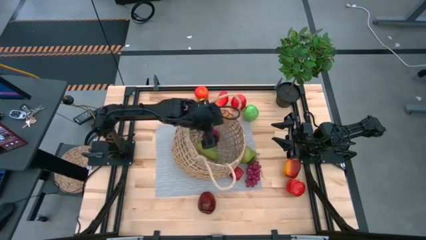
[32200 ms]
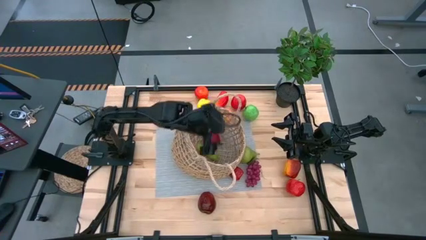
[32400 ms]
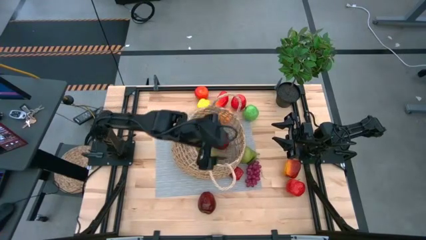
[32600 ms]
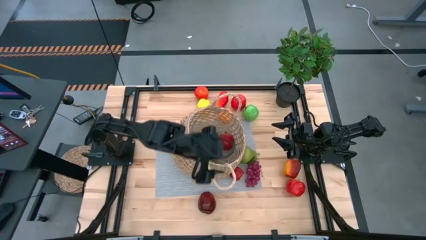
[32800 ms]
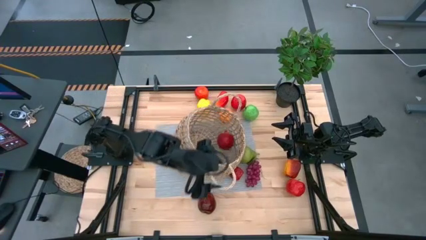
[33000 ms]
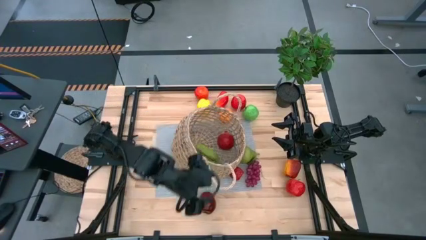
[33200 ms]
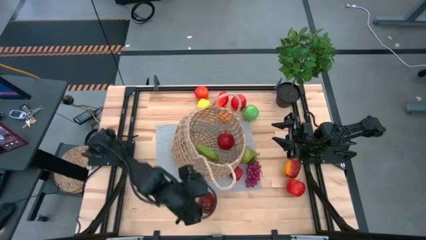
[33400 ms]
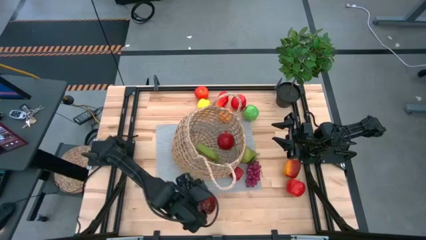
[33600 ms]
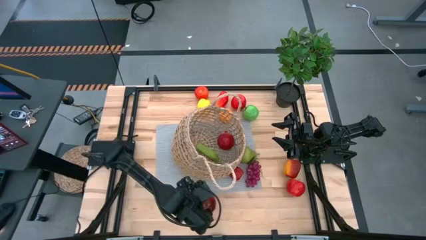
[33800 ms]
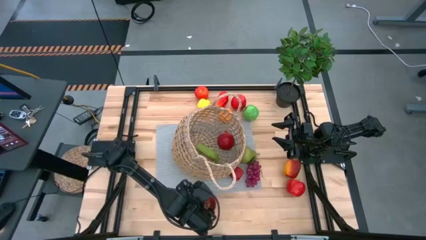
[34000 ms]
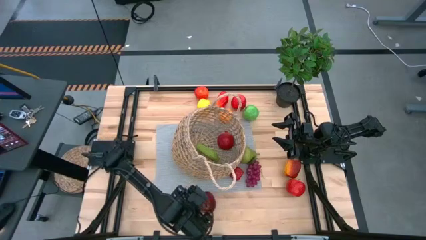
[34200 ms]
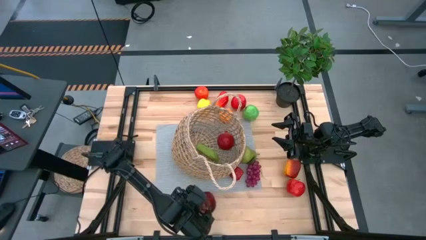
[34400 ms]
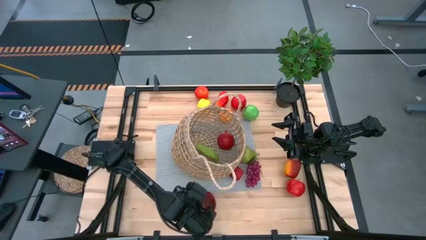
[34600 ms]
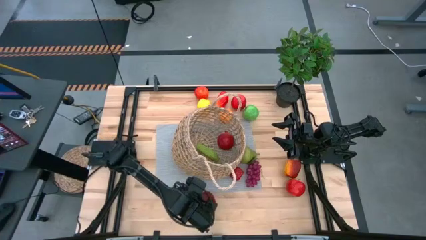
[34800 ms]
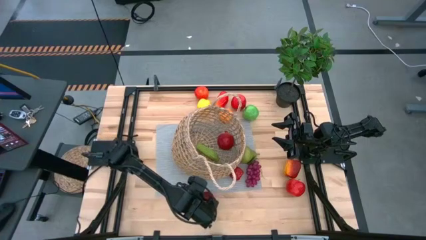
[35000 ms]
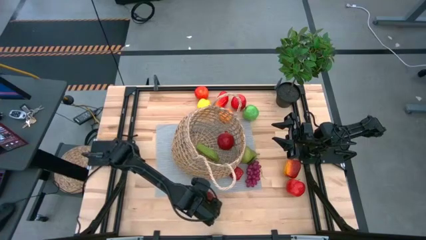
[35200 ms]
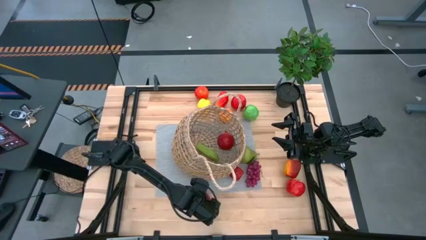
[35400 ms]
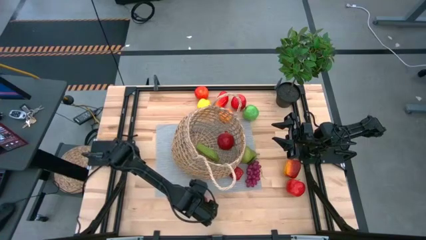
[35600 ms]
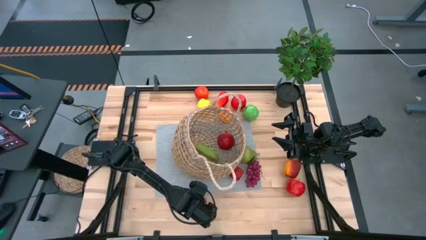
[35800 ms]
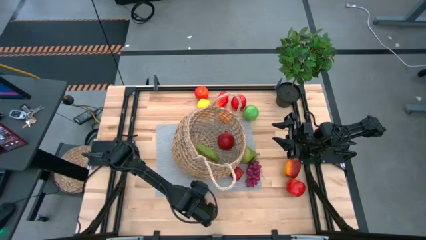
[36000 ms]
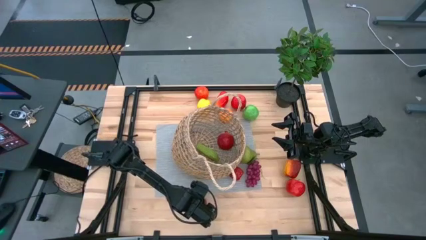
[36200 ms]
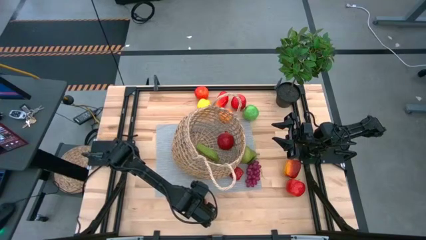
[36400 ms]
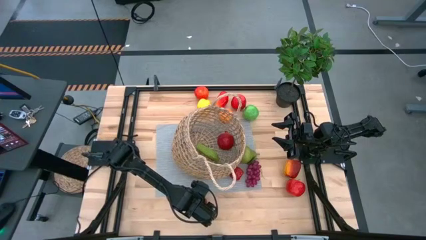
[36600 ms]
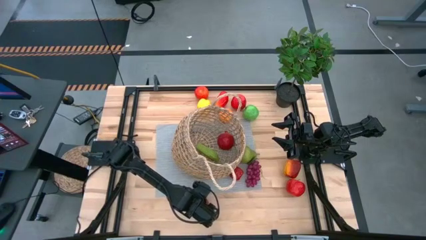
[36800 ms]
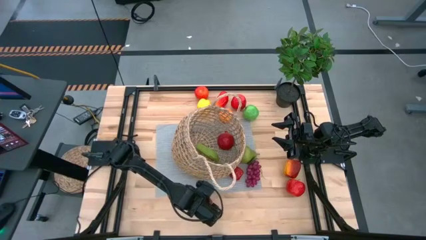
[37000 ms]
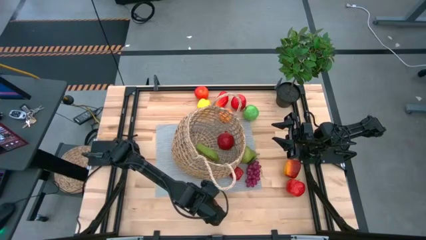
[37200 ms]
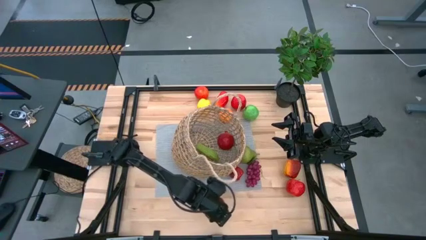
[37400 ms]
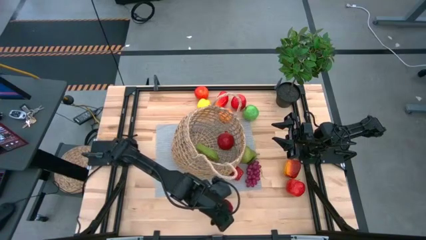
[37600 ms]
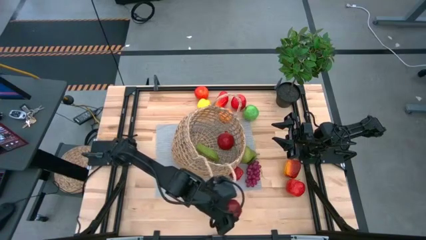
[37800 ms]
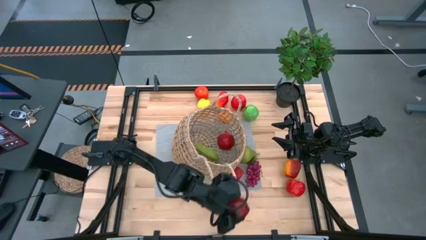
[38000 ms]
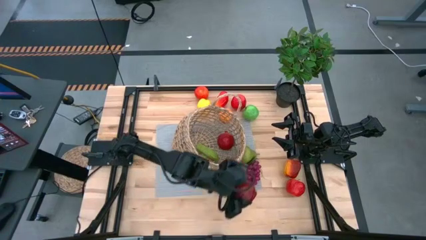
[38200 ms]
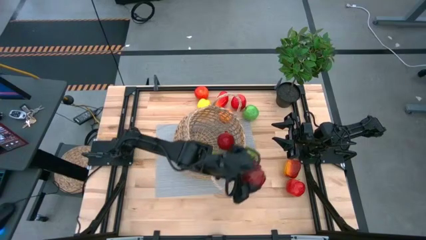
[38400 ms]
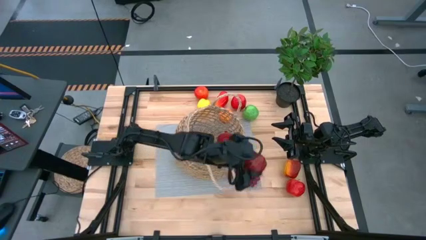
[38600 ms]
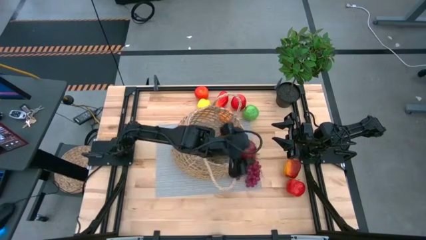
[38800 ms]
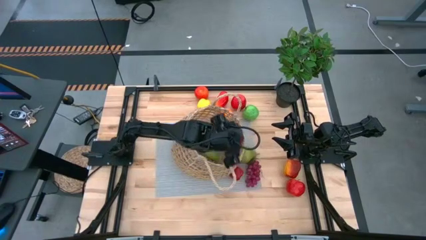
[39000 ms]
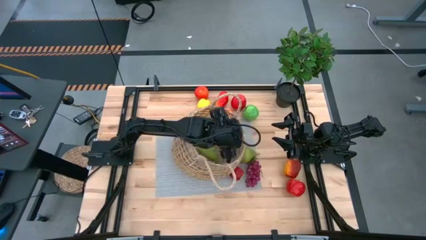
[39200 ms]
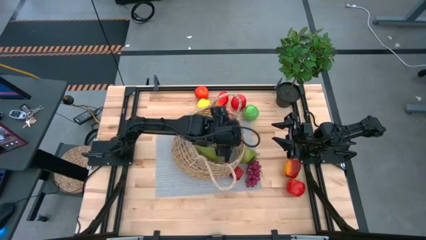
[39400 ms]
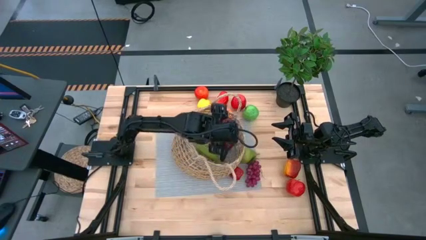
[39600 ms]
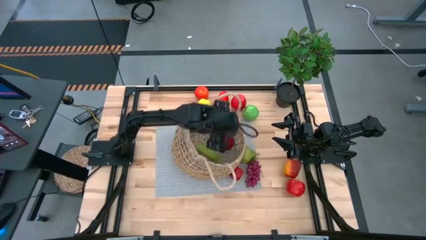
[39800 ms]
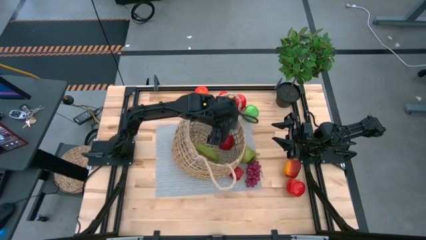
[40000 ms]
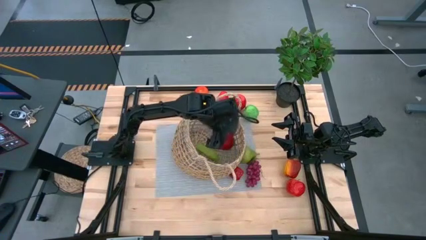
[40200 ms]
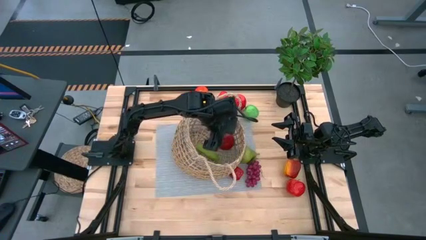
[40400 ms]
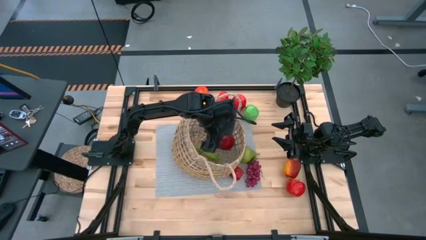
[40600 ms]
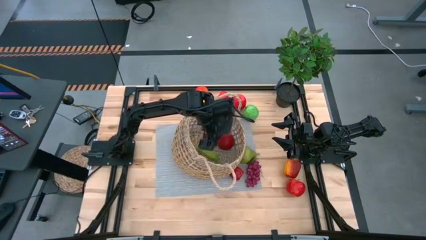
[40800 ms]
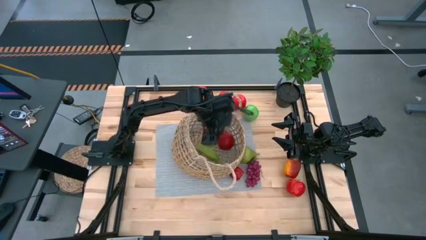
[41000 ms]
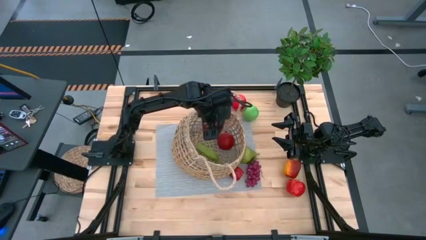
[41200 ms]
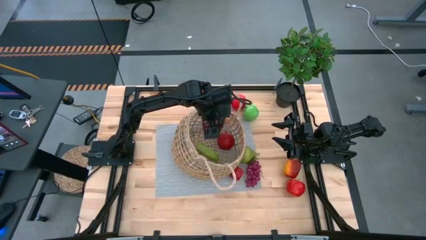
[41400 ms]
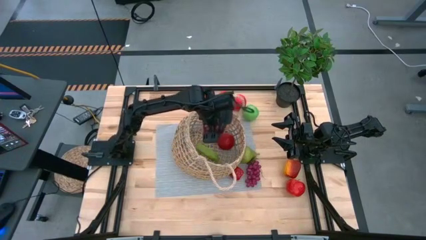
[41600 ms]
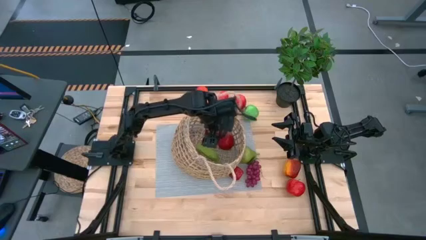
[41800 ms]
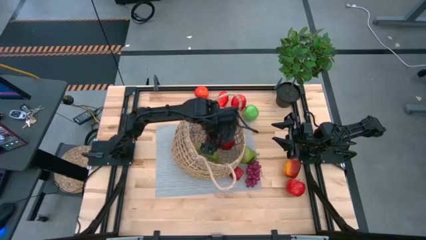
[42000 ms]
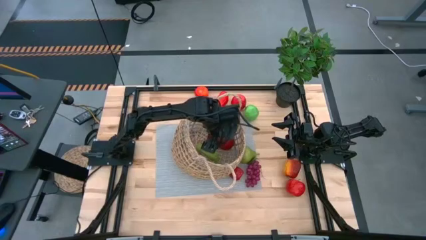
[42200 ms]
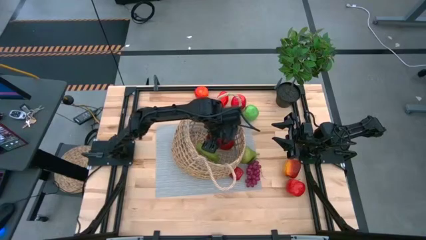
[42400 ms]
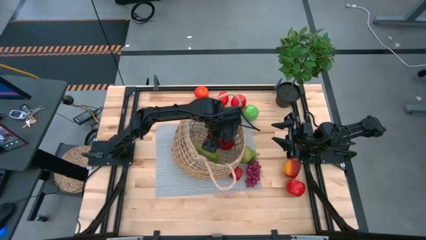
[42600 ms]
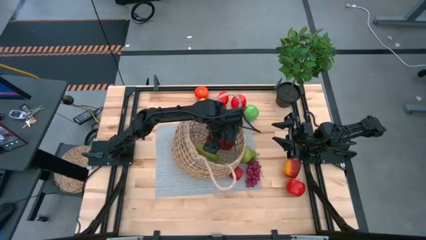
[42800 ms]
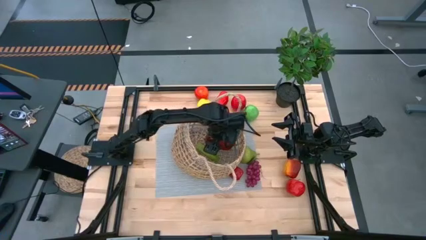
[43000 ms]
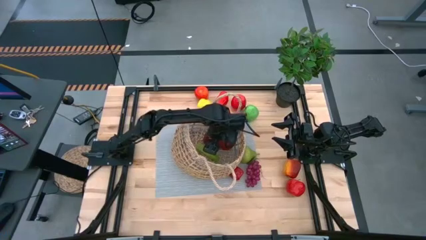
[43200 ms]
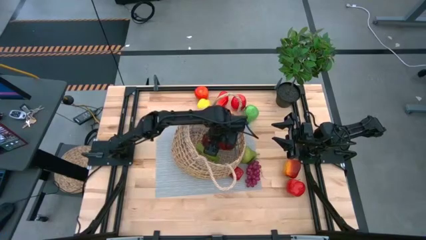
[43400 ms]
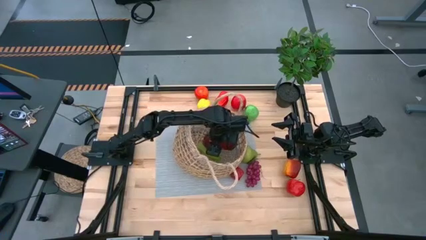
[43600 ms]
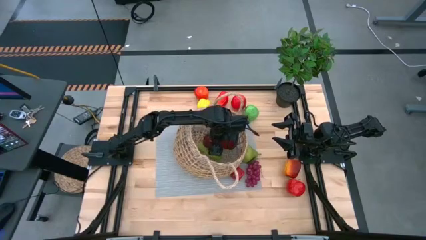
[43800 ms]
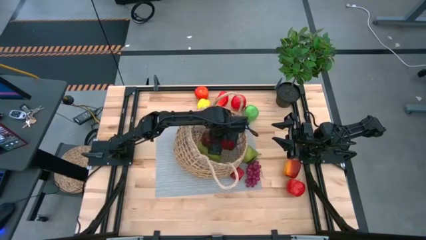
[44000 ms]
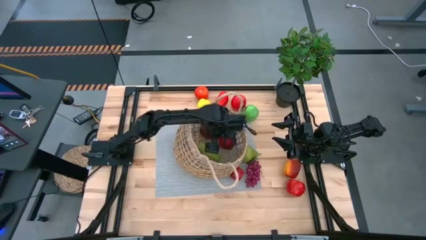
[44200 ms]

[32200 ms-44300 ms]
Task: Build produce basket
Put the bottom left red apple into the mesh basket

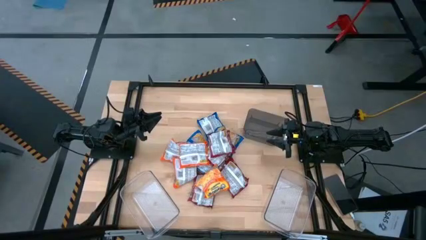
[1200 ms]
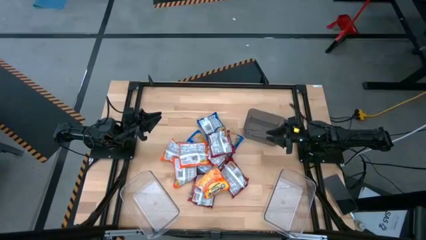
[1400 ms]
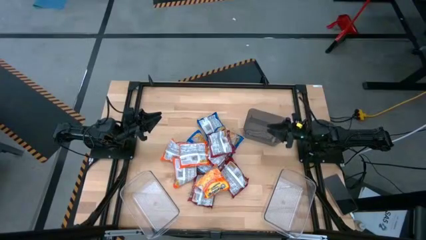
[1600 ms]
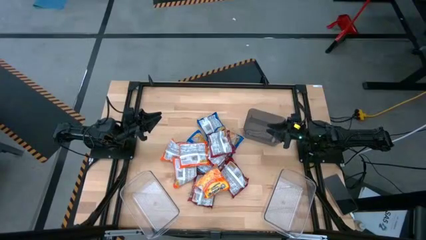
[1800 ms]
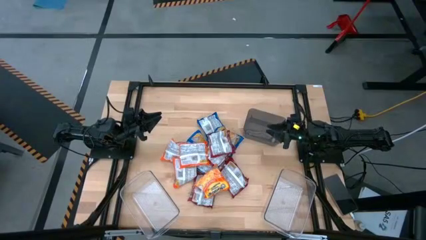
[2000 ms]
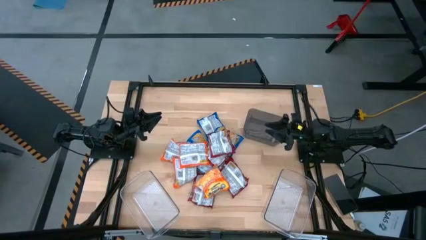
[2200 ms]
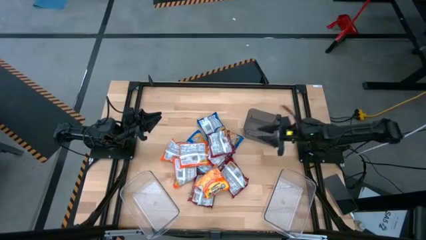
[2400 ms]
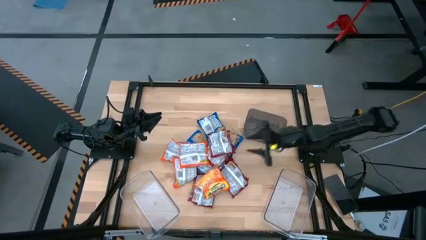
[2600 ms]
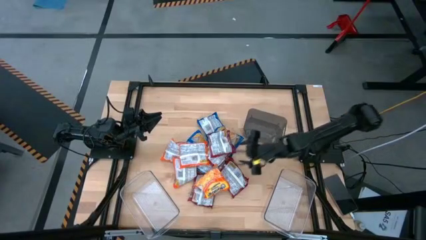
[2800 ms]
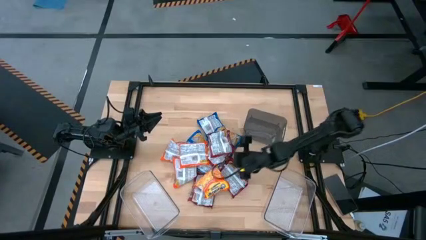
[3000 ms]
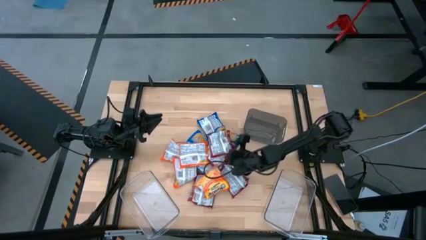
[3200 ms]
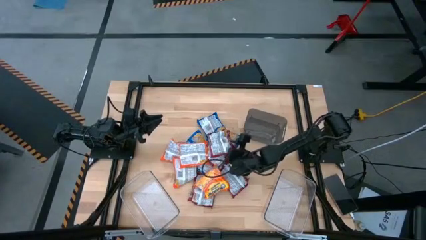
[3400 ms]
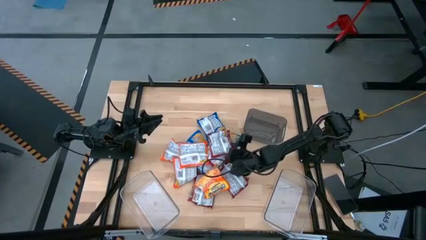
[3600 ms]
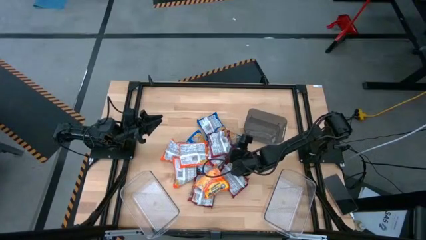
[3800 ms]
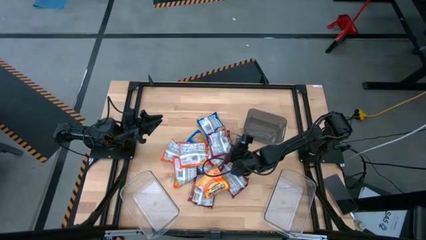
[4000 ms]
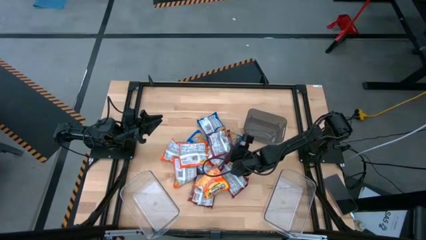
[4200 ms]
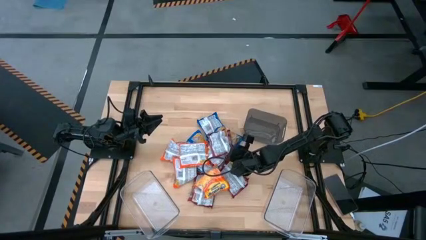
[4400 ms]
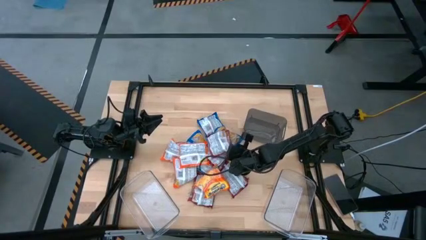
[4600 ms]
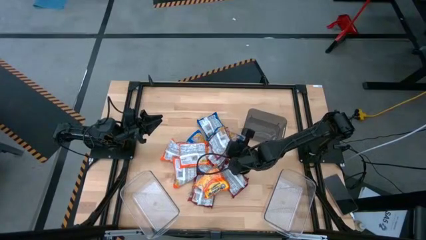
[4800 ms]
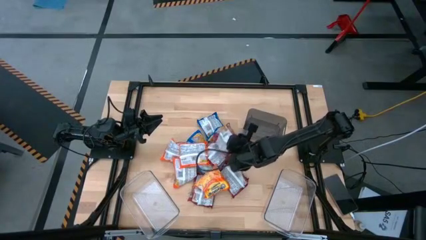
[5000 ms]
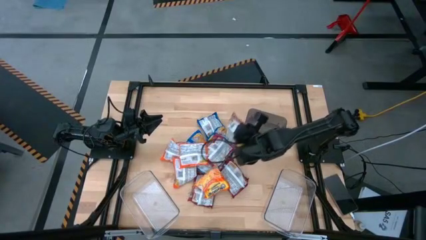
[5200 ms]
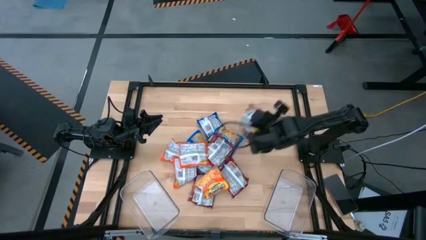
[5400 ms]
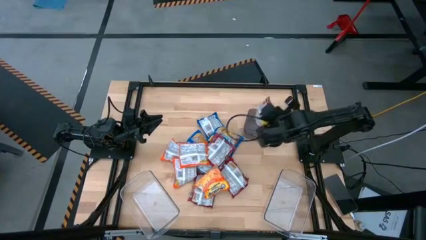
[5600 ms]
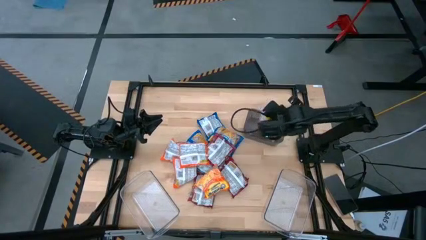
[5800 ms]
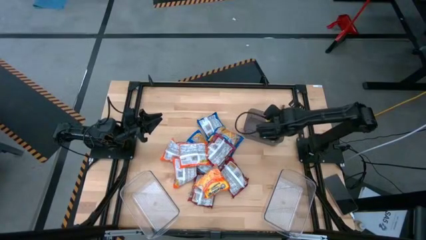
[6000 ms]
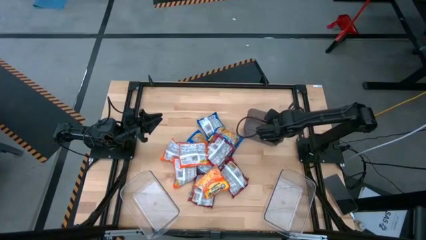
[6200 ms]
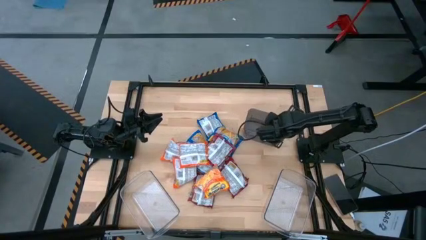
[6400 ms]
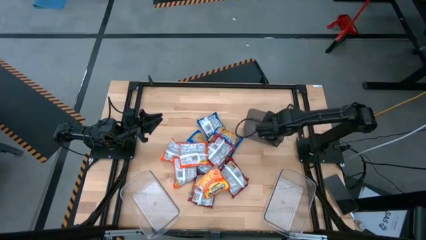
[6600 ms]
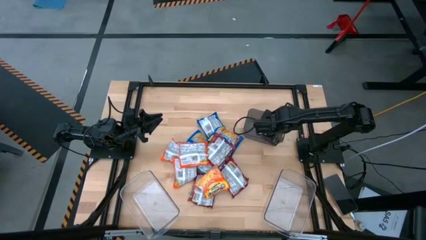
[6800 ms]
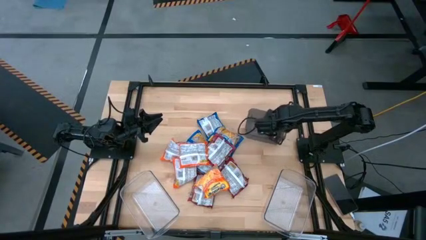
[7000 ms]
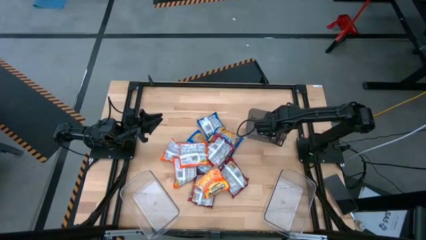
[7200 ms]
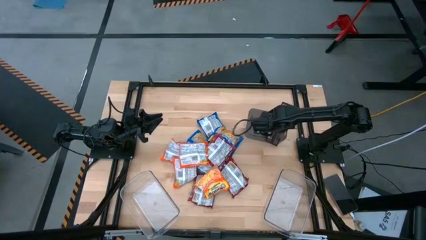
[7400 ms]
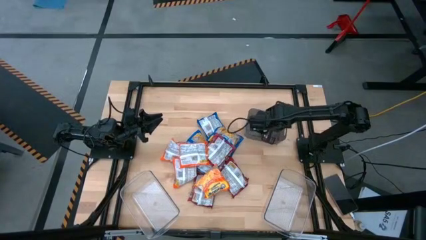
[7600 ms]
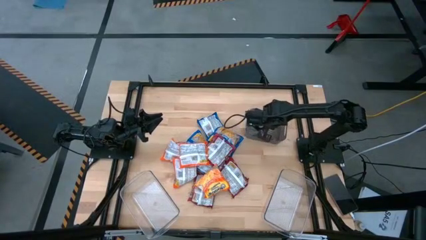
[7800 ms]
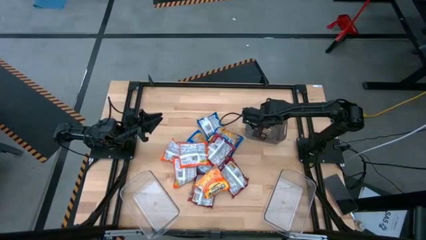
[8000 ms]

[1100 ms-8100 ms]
Task: Sort Maruchan noodles
Put the red noodle pack into the black bin
